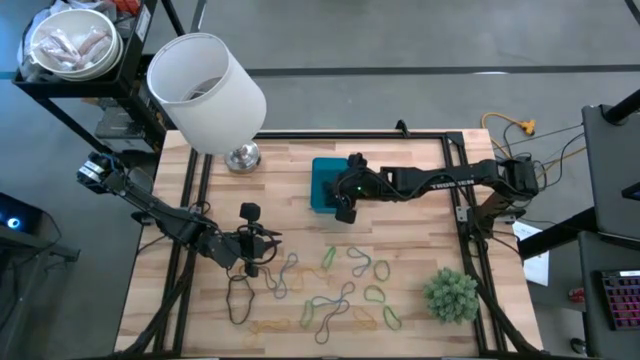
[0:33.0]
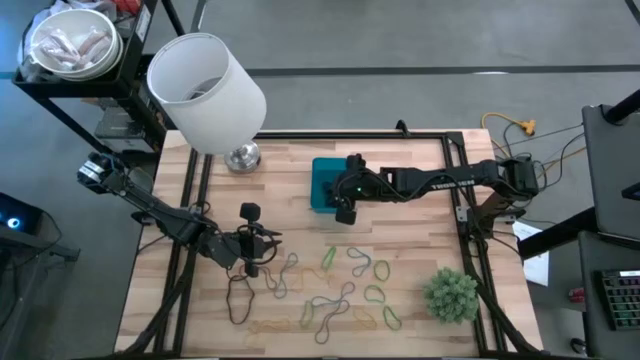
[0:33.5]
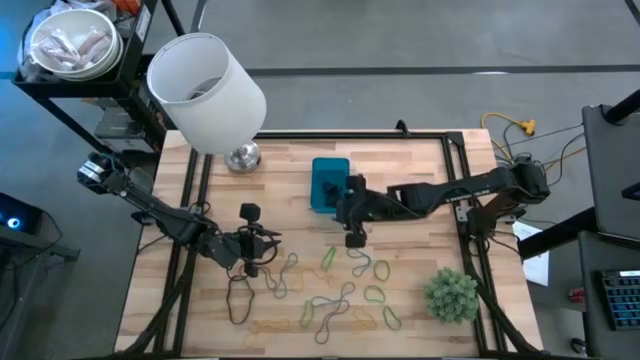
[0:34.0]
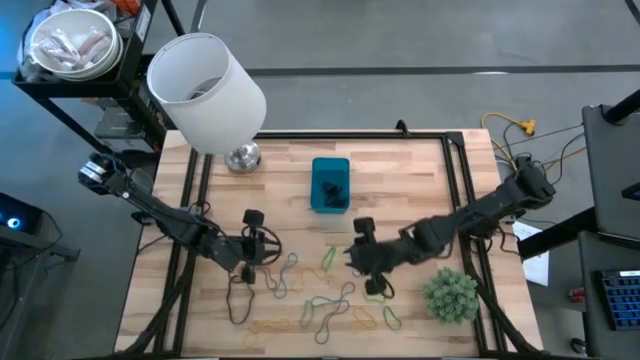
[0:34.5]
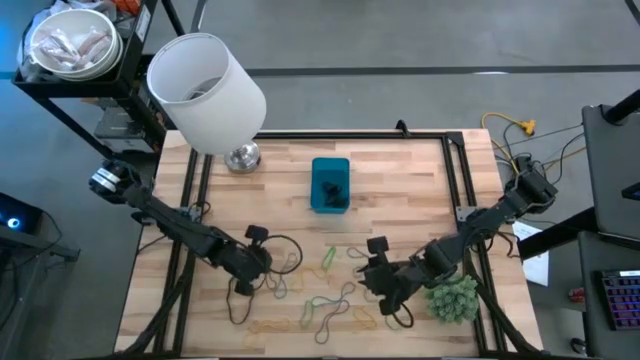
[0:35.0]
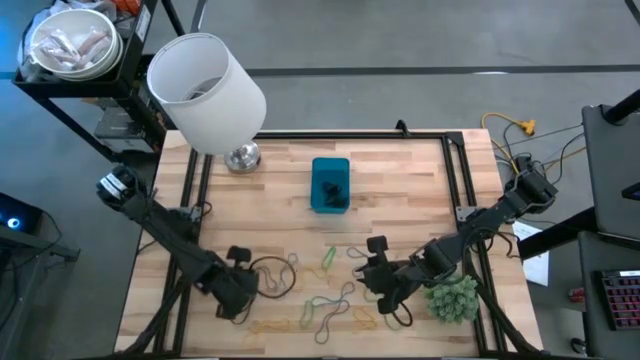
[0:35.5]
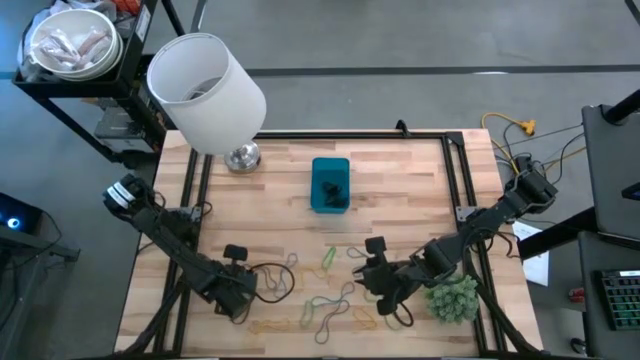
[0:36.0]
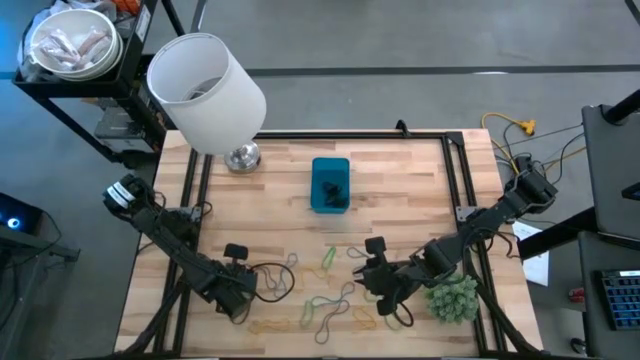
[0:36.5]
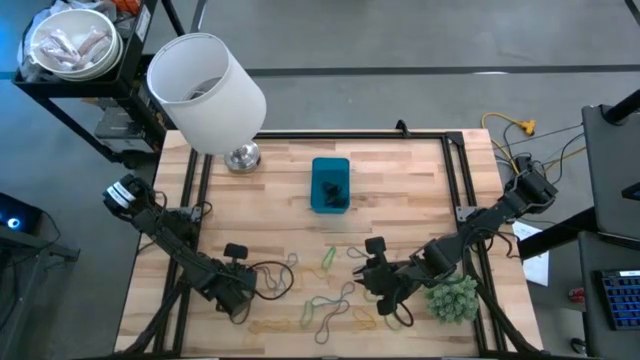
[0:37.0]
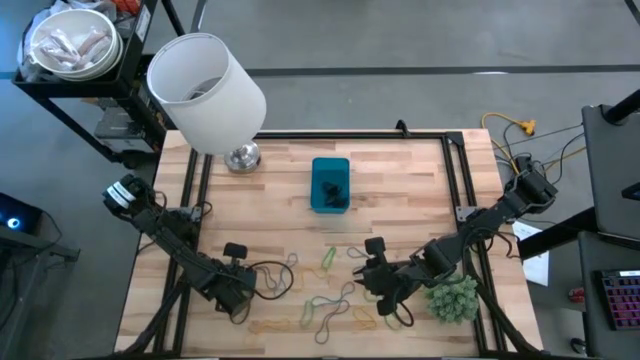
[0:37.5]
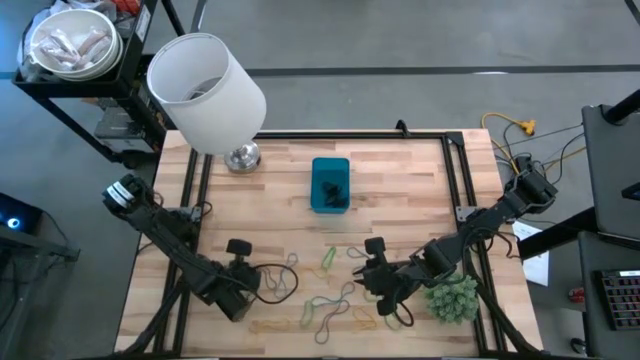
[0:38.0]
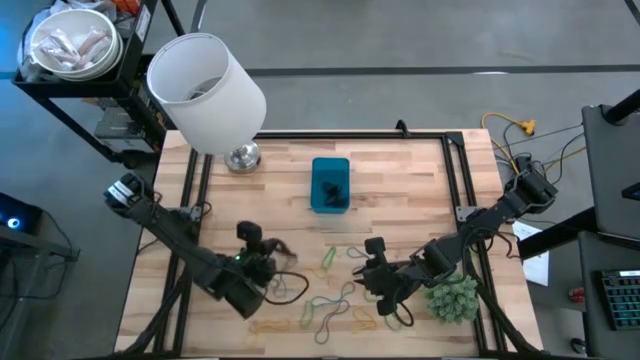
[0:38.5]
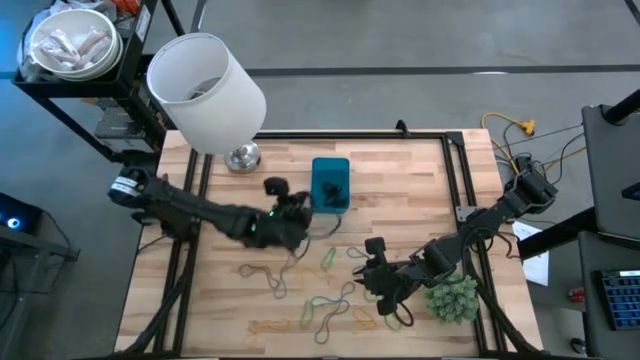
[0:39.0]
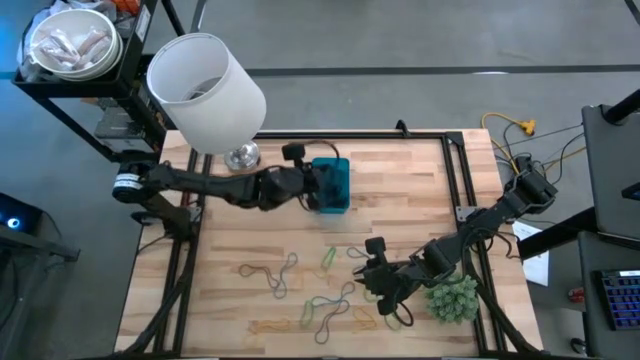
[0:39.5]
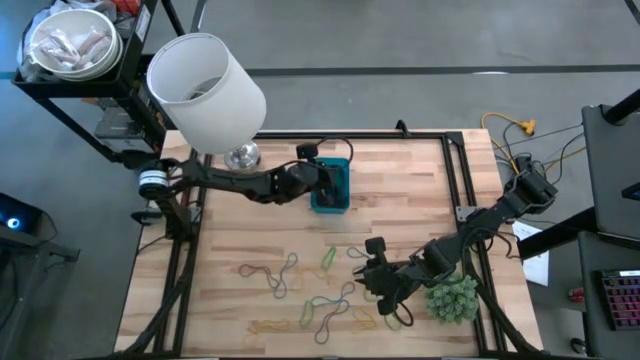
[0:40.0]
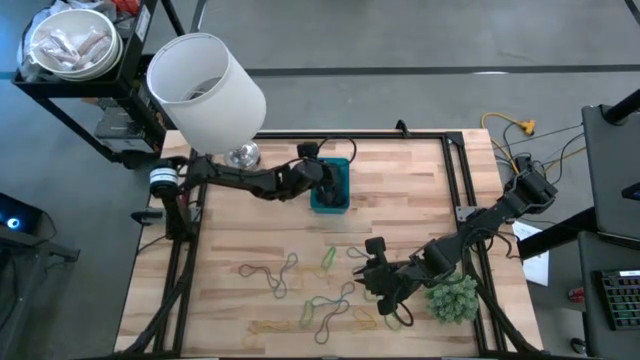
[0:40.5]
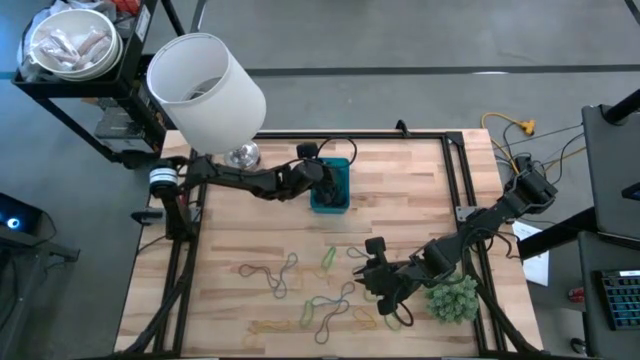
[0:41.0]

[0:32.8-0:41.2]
Task: Pick and place rubber bands into bin
Put the black rubber band into the blue bin

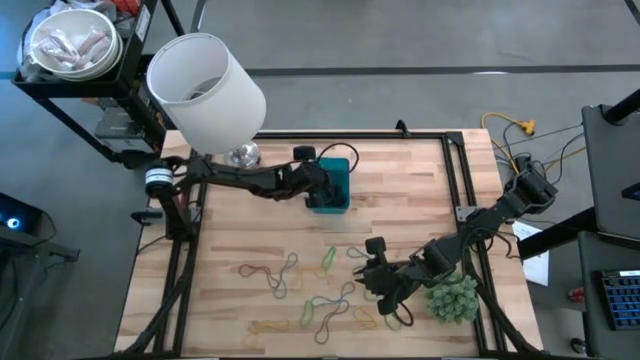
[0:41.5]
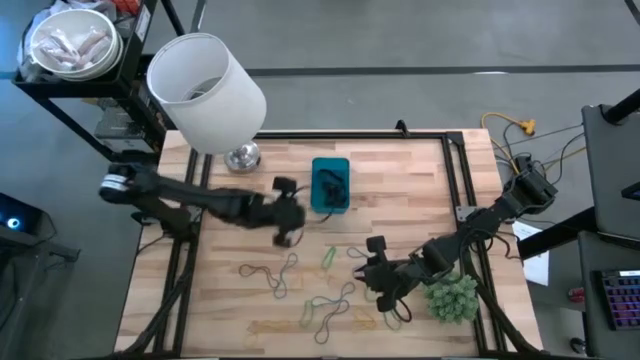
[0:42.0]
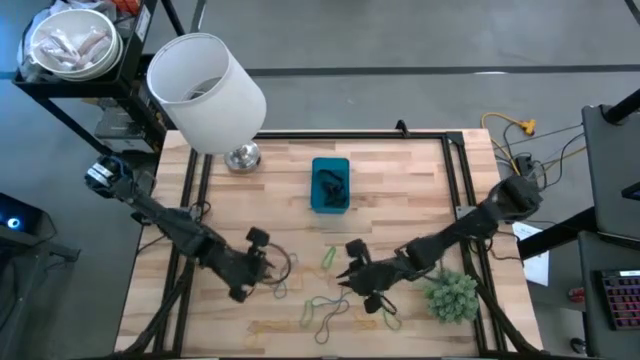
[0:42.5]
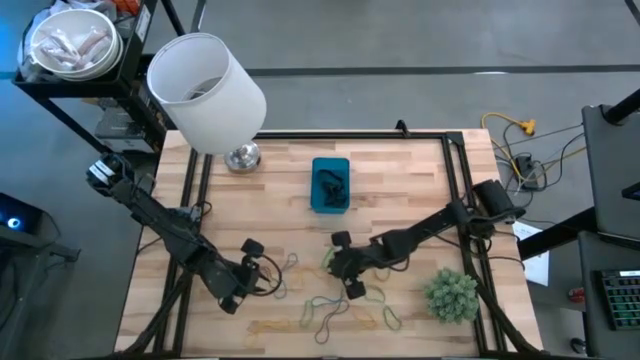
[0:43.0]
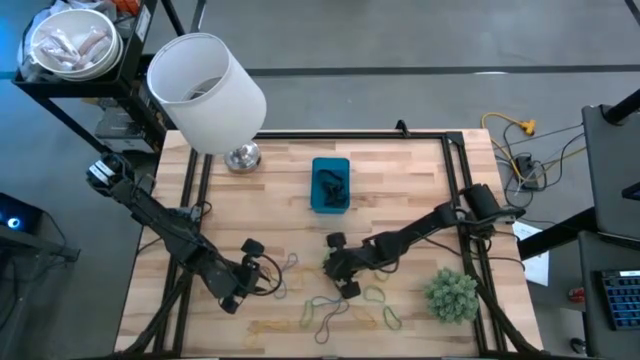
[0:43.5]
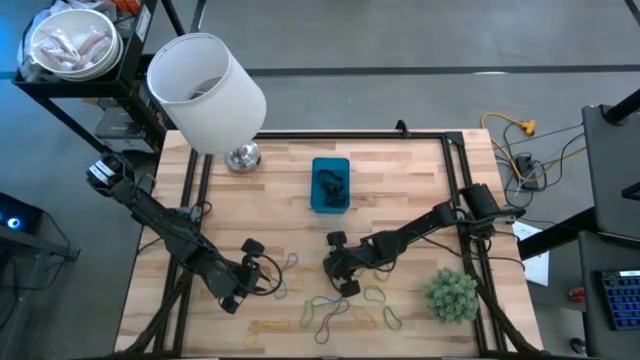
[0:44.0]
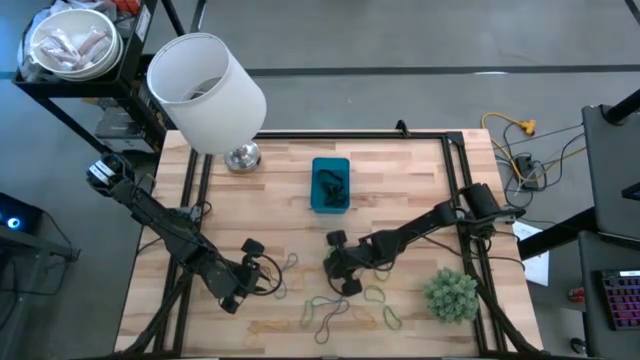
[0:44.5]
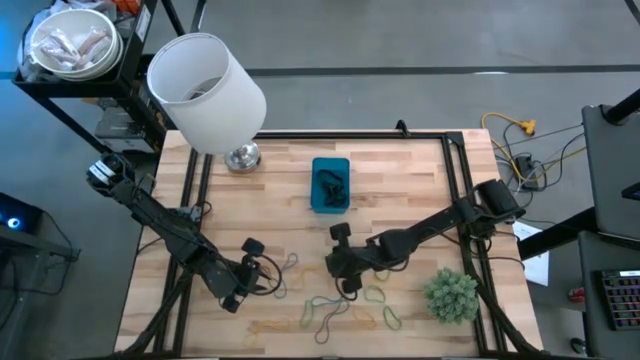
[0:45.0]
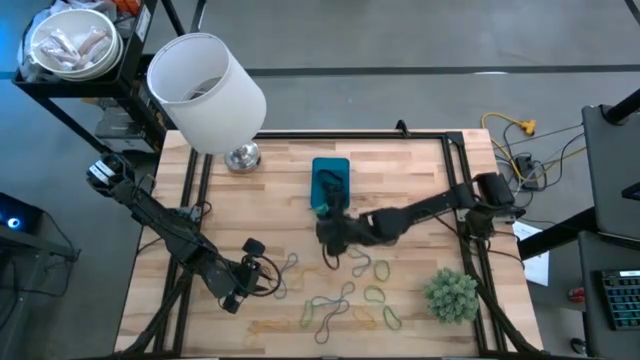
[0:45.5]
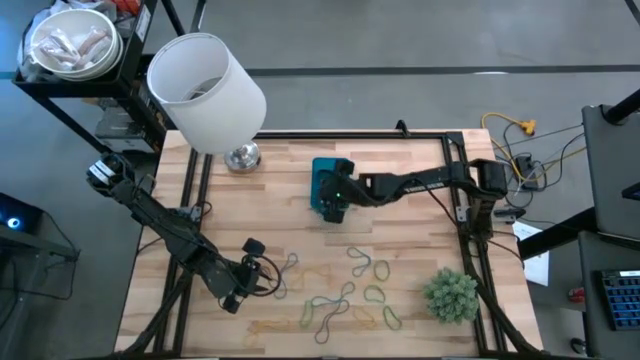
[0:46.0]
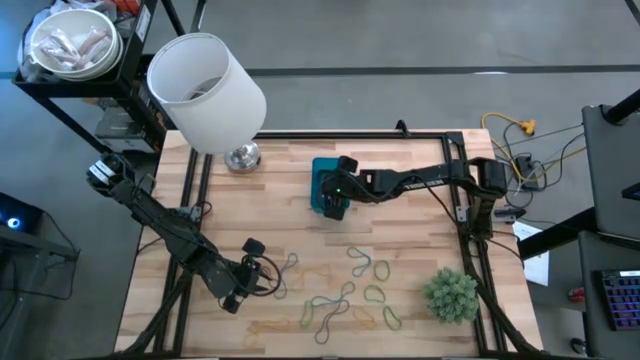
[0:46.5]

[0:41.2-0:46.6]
Put the green rubber band into the blue bin

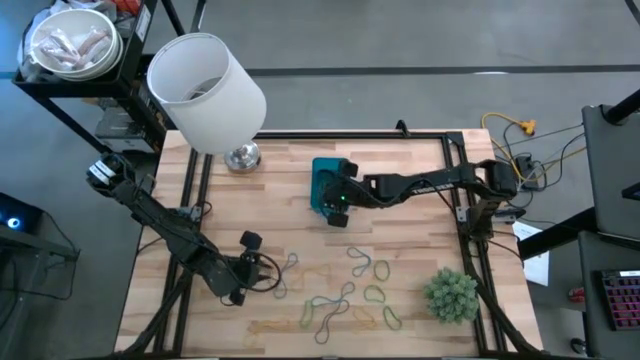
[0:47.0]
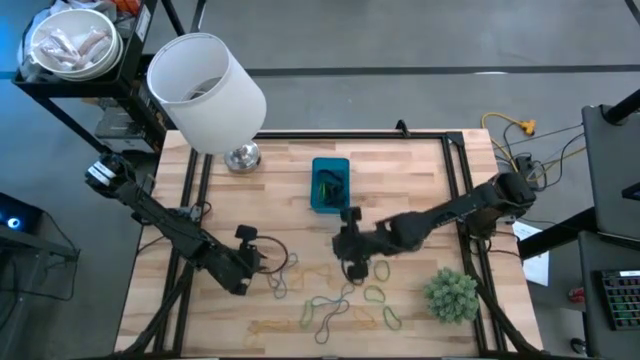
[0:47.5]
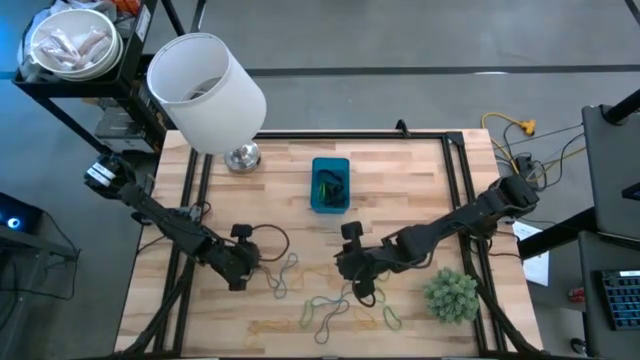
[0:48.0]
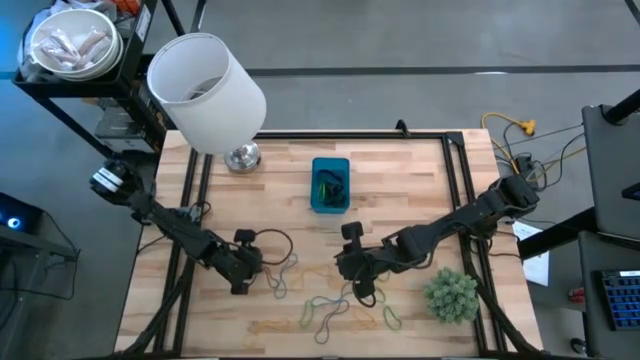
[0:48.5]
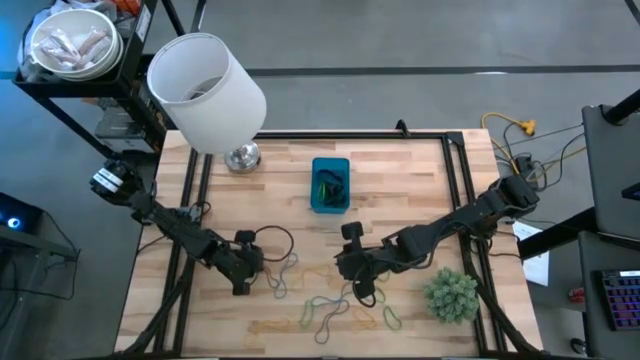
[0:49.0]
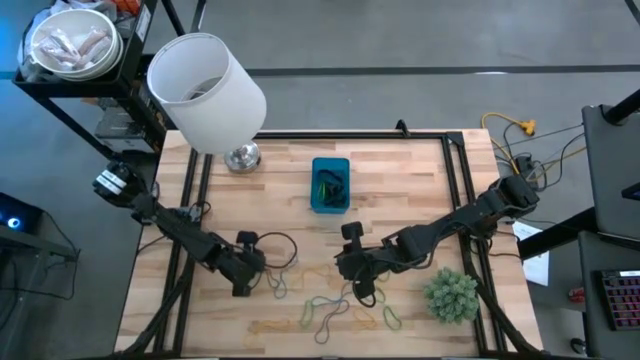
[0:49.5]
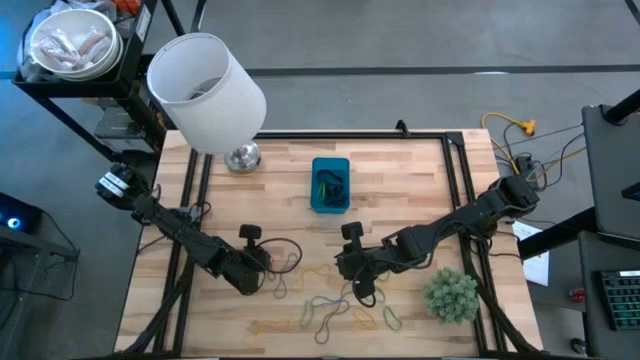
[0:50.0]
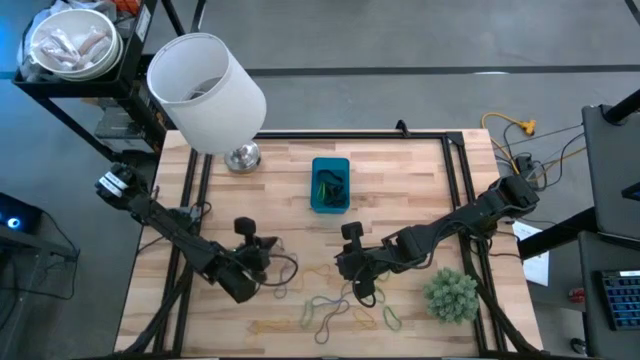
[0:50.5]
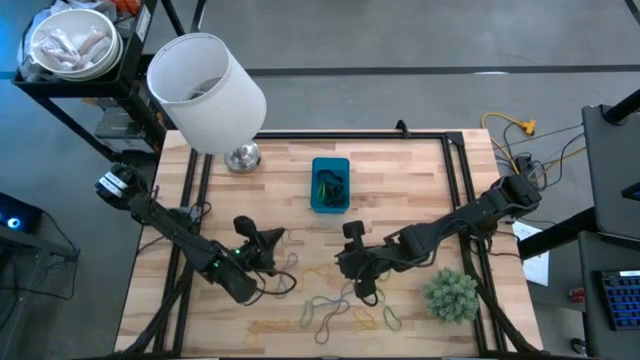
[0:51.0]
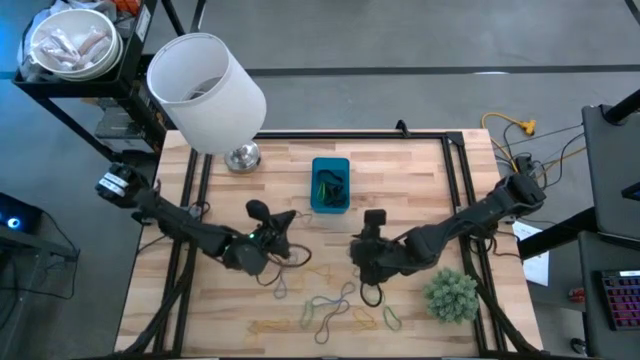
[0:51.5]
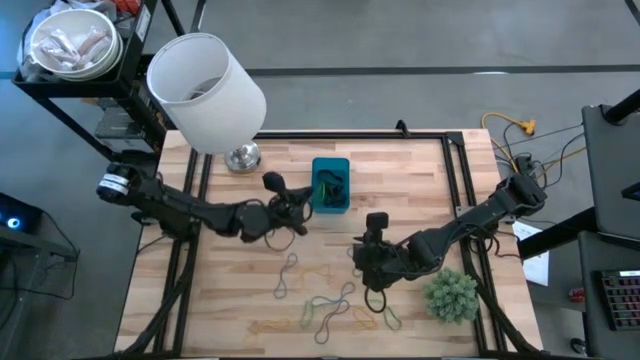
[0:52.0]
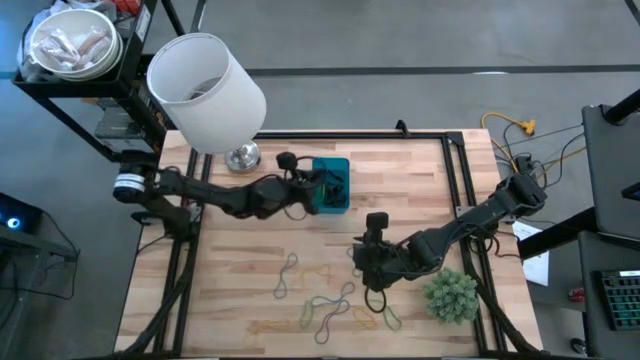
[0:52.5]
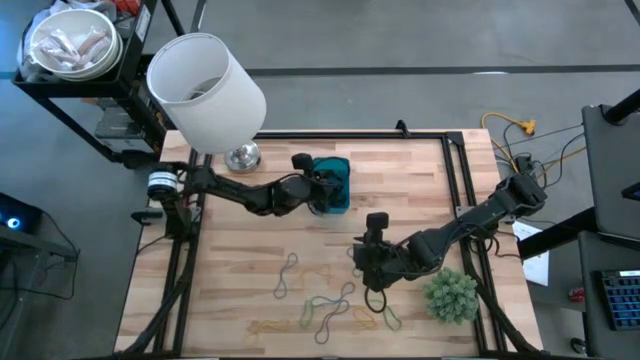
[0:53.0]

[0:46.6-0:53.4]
Put the violet rubber band into the blue bin

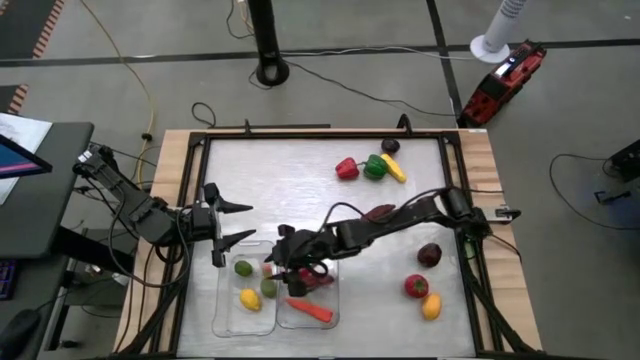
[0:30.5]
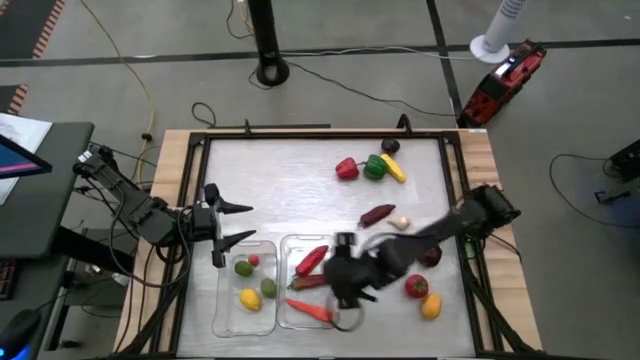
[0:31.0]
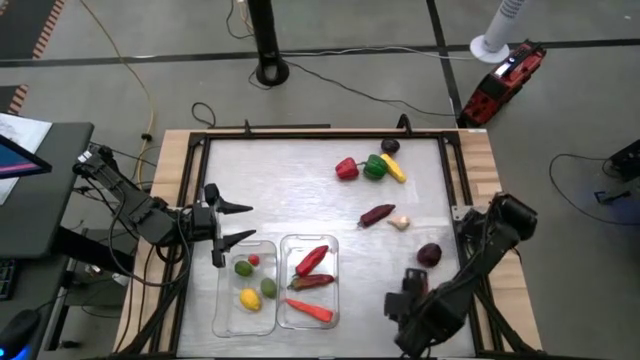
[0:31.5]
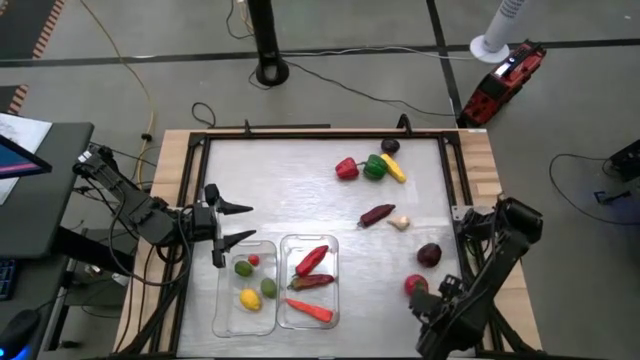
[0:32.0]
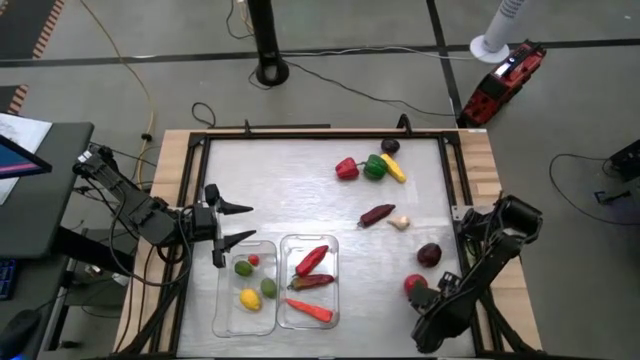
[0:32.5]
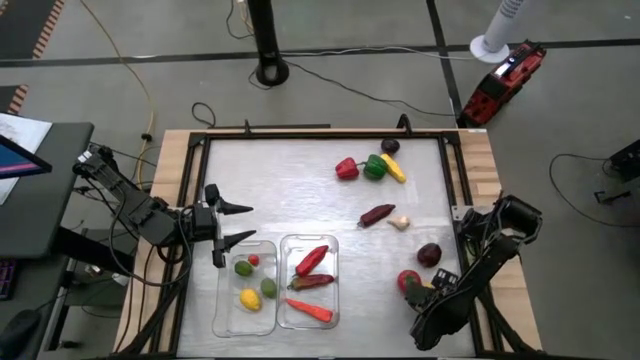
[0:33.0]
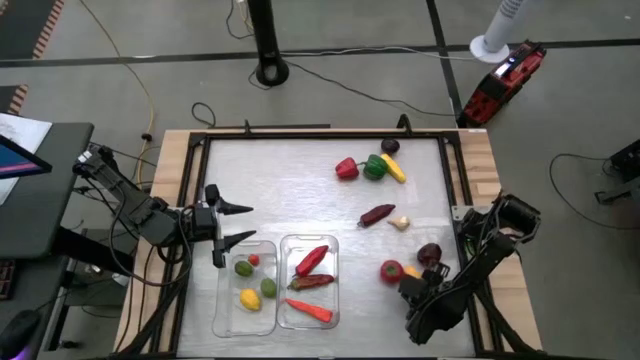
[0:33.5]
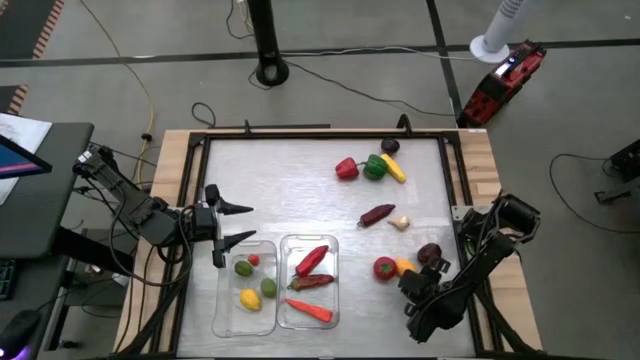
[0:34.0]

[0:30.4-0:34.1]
Task: Sort produce into baskets
Put the yellow lemon into the left transparent bin
